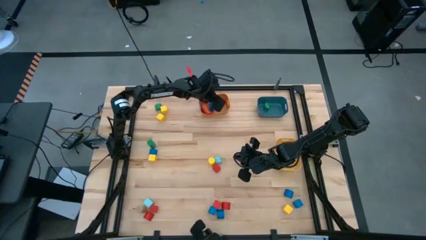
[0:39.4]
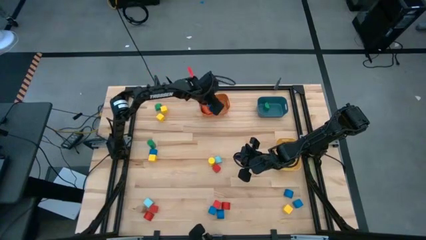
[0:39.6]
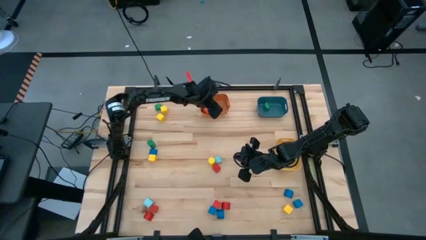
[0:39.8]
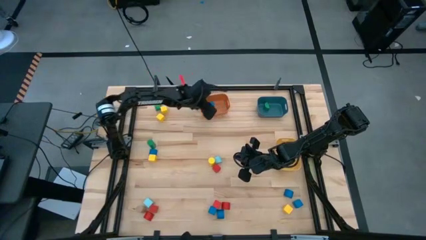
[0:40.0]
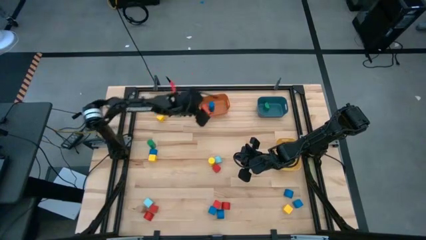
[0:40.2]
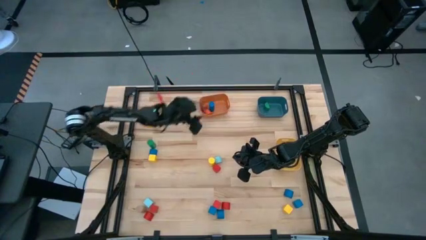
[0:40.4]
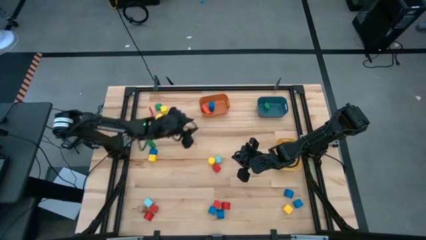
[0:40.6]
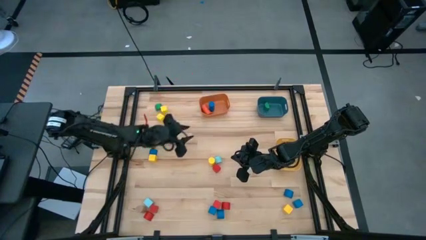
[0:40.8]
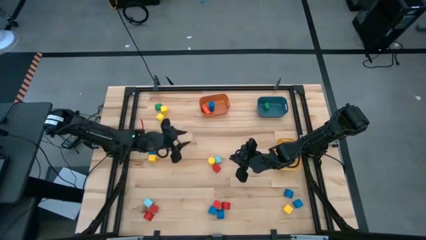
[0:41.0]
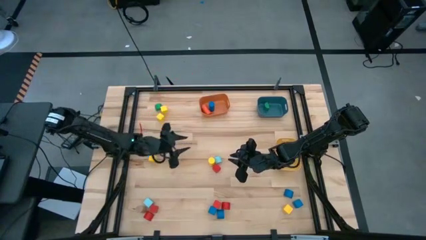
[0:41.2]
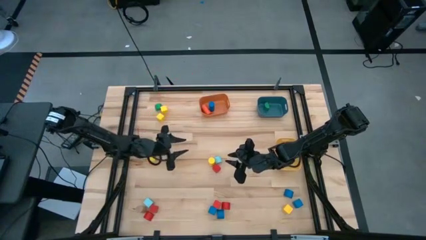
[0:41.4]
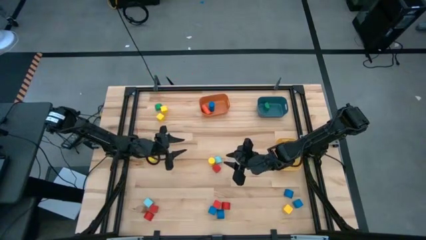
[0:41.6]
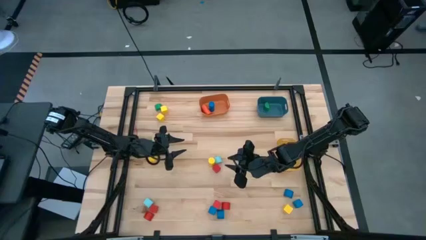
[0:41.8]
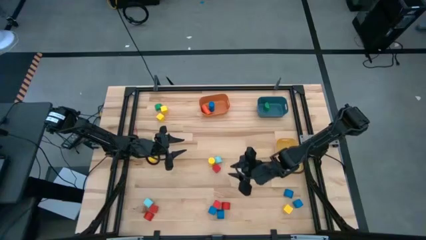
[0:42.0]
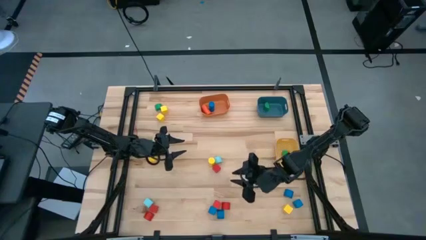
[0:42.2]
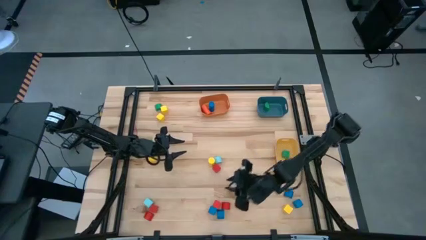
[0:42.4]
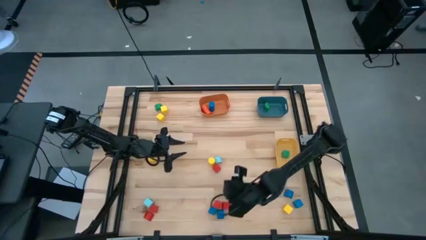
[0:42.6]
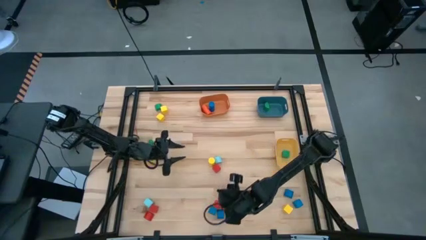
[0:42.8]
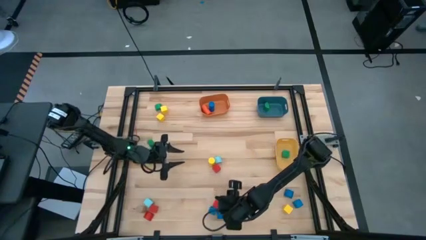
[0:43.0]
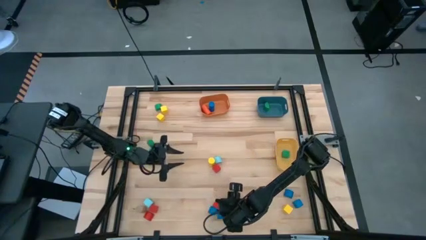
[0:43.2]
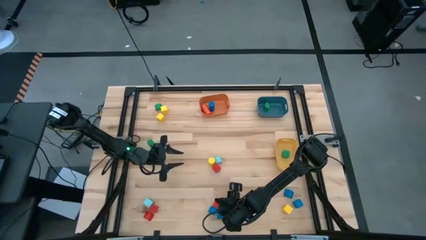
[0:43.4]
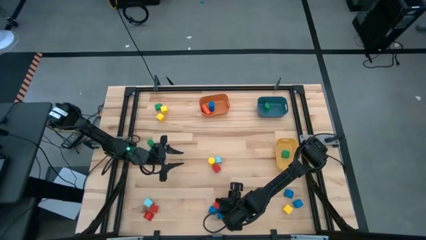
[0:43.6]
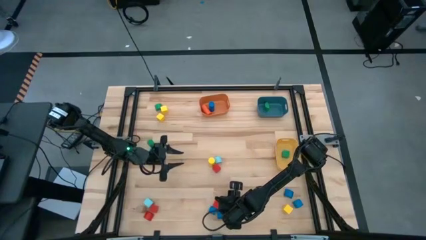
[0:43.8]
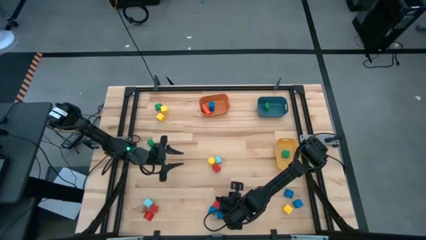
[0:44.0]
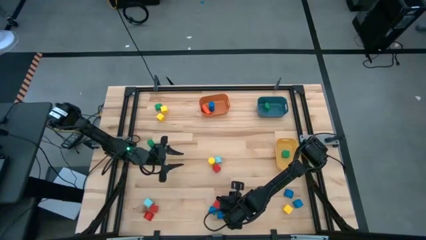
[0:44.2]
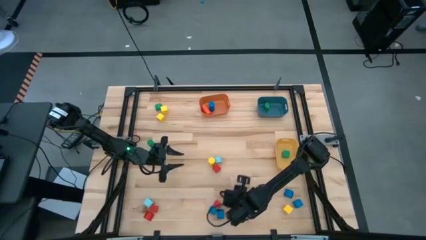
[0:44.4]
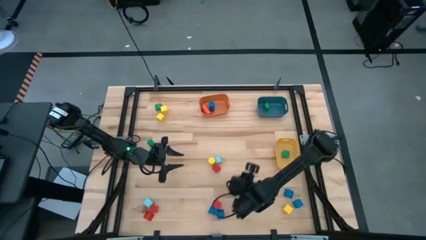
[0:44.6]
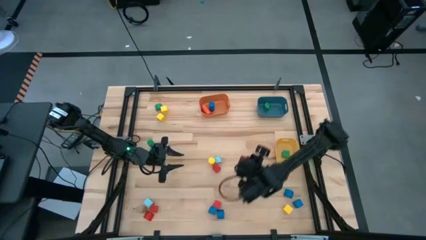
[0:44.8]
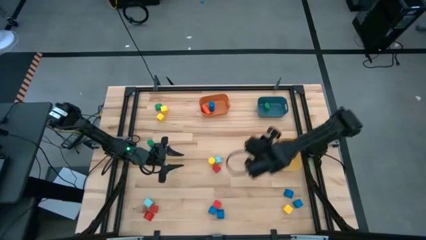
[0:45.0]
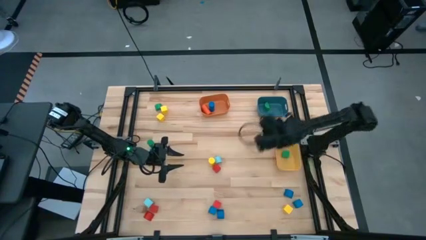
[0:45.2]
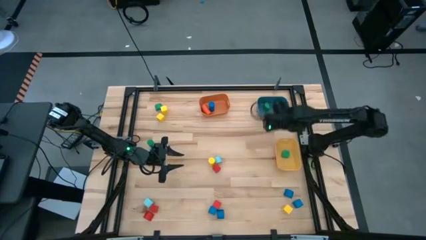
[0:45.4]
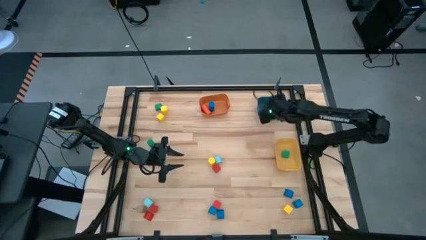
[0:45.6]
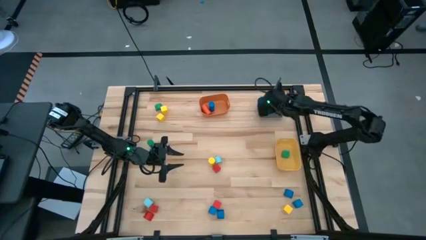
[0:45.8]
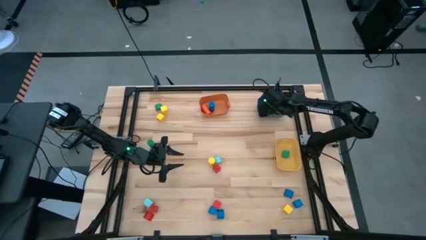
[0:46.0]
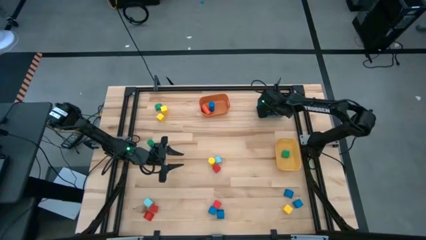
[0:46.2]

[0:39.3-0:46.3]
Task: Sort blocks by size
Put the red half circle block into the blue bin

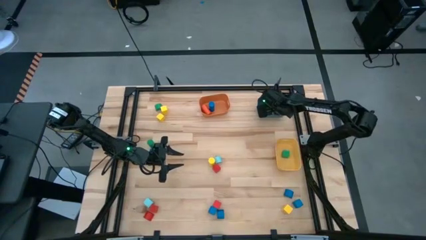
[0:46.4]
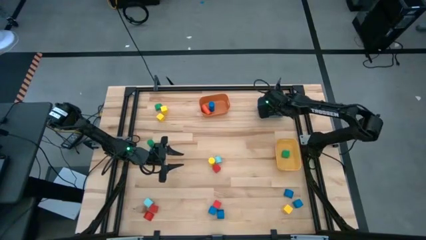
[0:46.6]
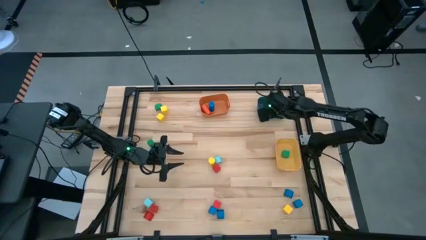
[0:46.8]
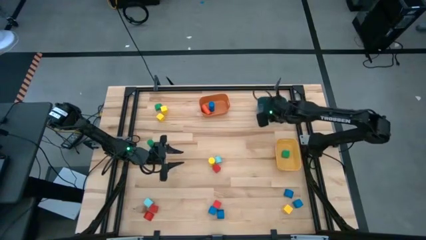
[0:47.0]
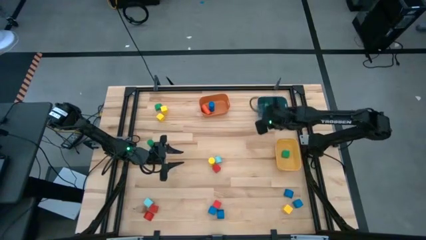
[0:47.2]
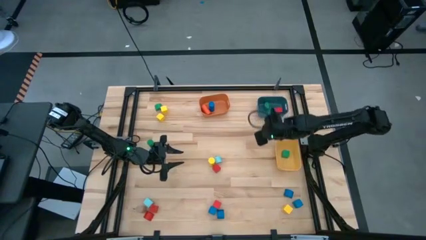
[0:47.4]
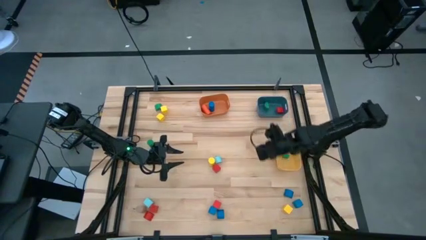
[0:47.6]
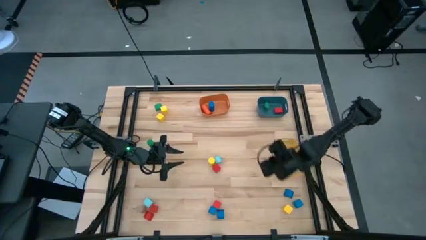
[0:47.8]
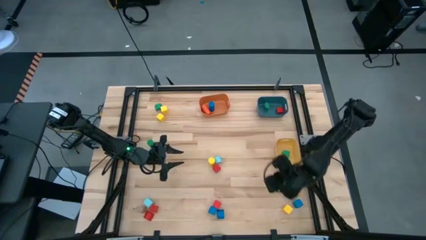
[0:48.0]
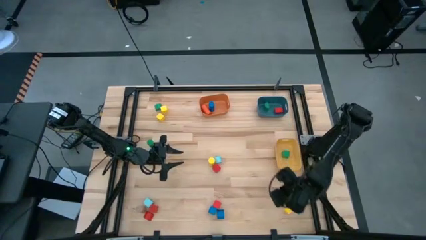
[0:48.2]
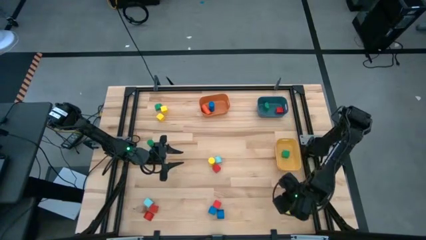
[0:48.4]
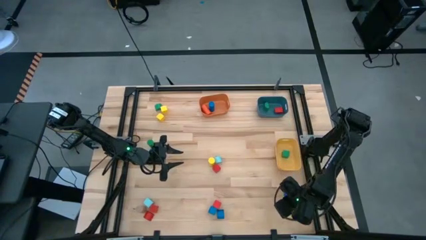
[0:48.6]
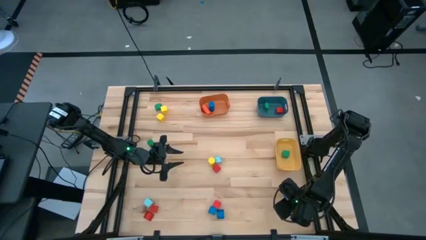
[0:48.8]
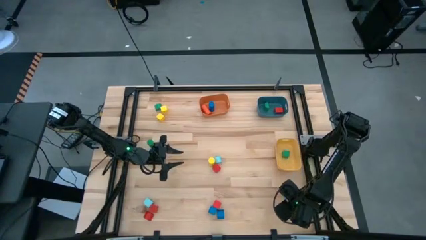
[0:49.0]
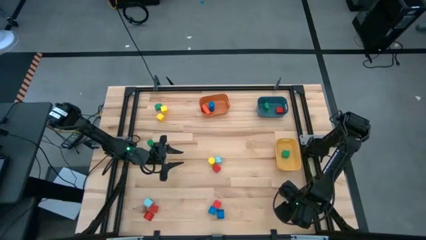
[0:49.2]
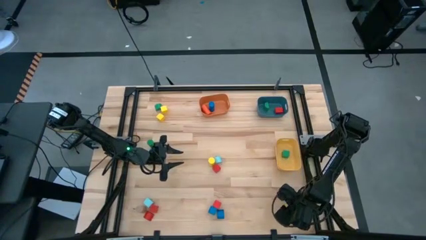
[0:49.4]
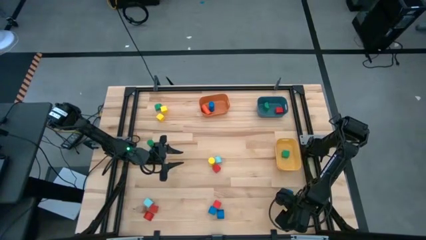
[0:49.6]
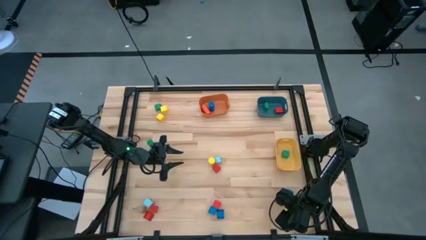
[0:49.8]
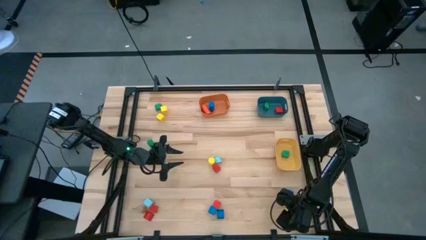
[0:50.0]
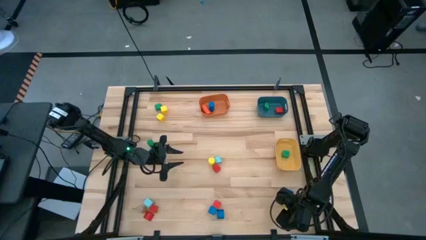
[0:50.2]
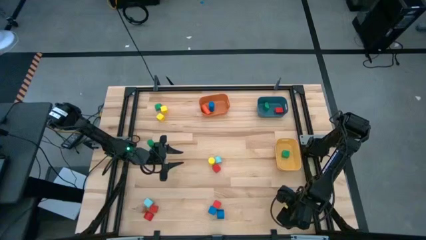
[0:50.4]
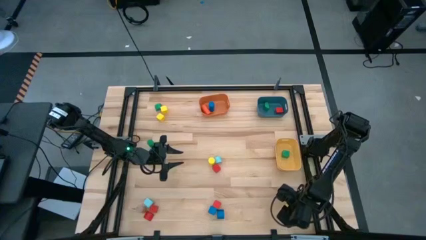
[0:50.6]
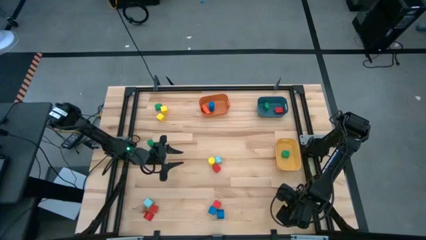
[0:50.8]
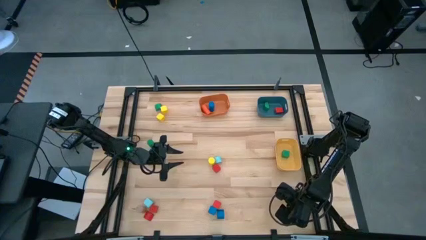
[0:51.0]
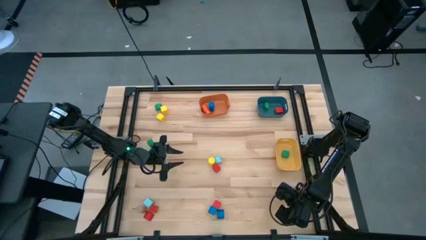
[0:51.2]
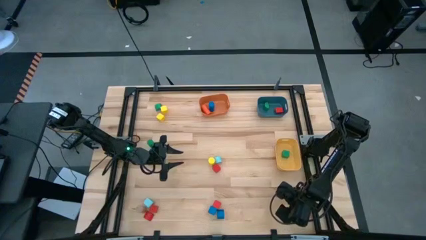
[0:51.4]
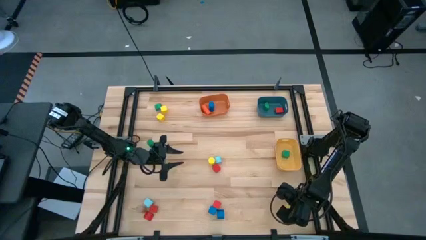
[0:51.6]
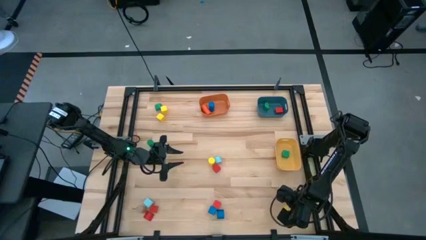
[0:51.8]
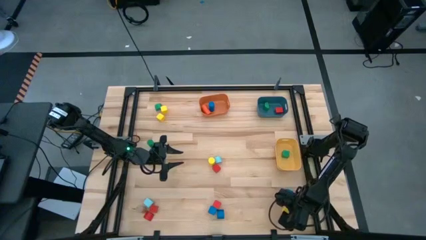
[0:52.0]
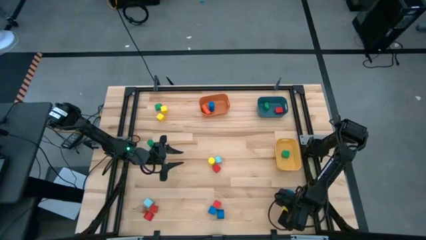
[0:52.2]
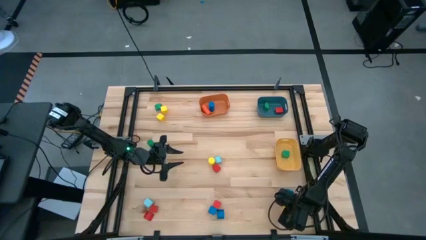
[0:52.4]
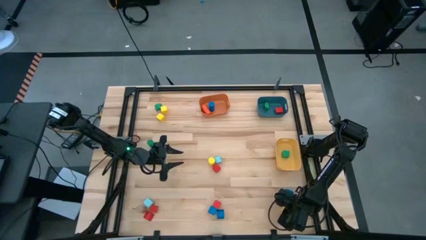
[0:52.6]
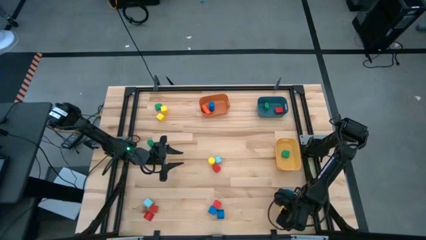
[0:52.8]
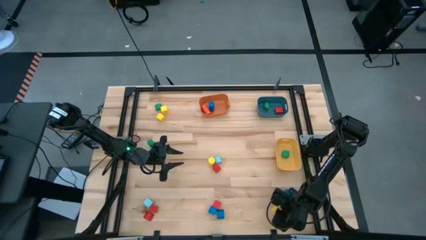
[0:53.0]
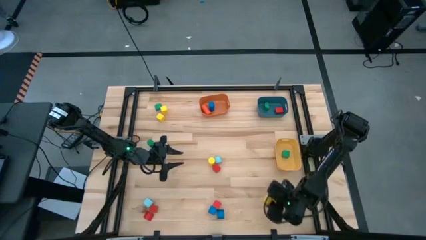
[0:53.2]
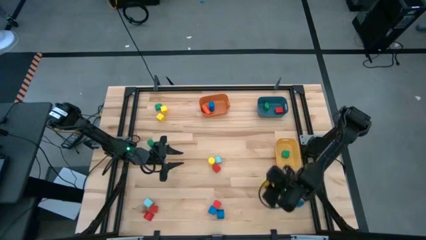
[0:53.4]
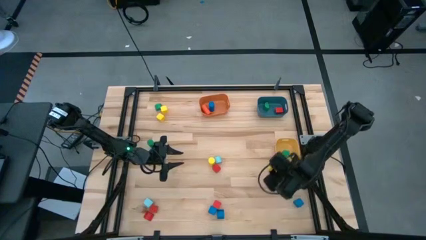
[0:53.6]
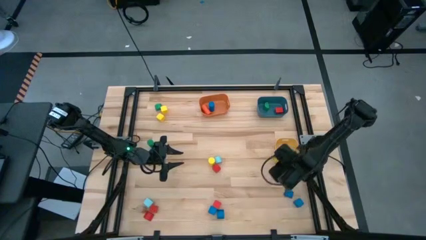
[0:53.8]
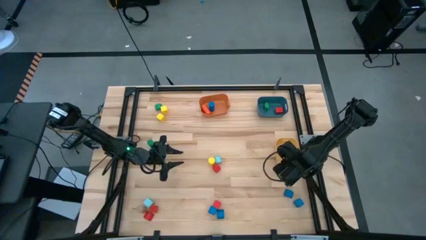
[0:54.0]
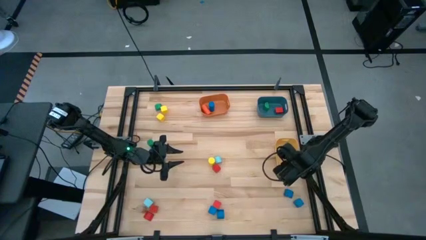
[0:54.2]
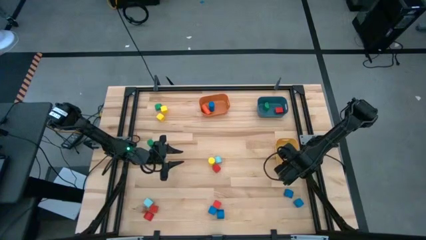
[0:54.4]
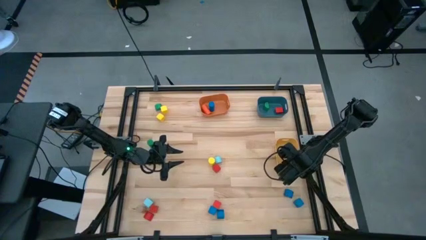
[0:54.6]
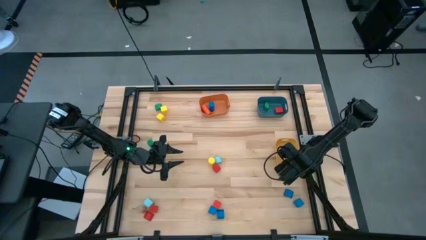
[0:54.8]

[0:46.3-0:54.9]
Put the yellow cube block into the yellow bin
